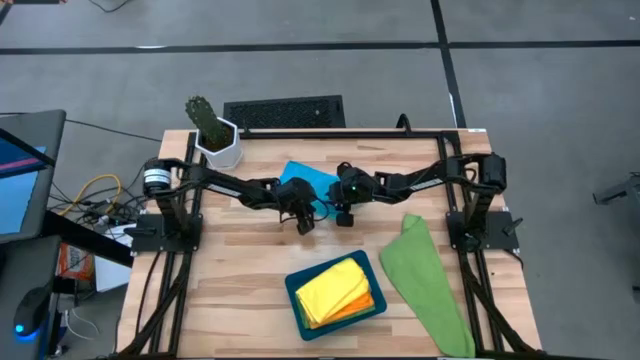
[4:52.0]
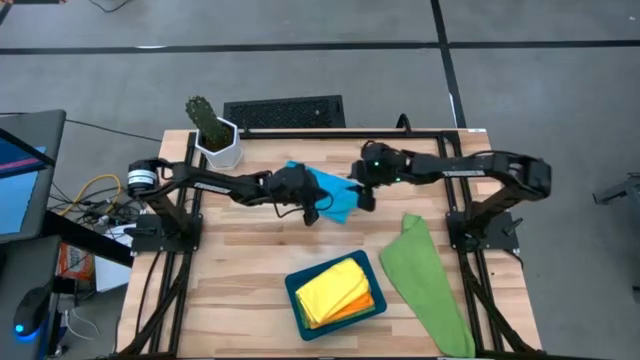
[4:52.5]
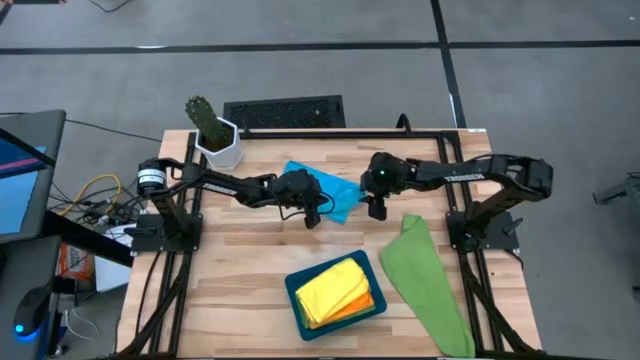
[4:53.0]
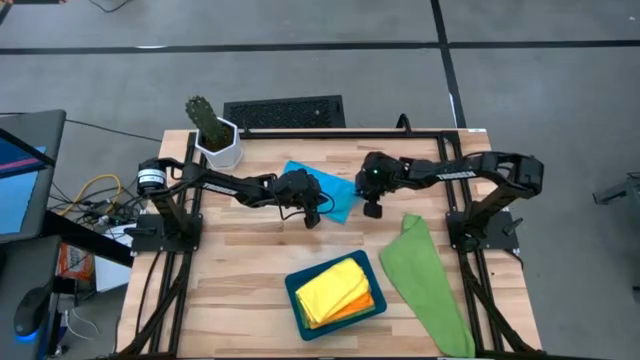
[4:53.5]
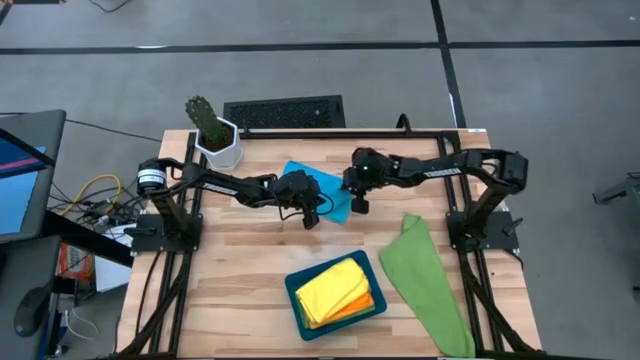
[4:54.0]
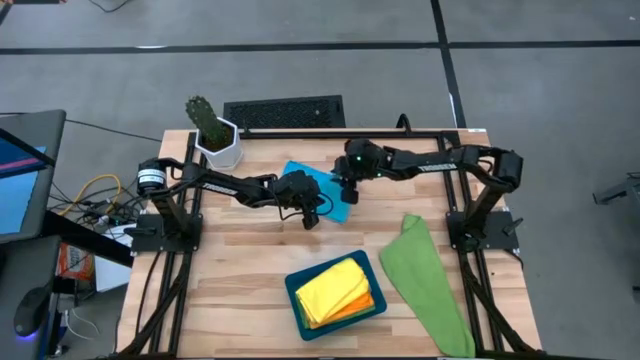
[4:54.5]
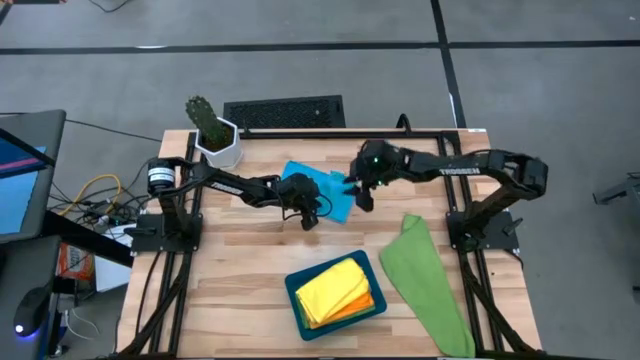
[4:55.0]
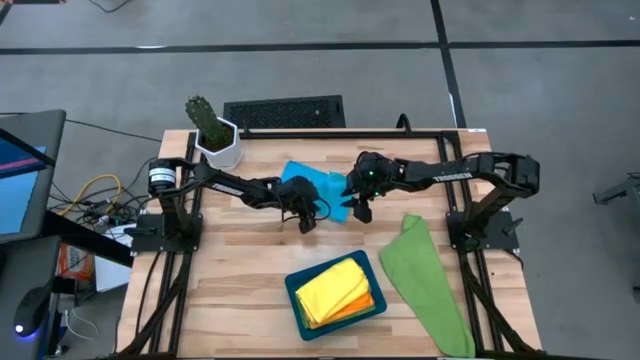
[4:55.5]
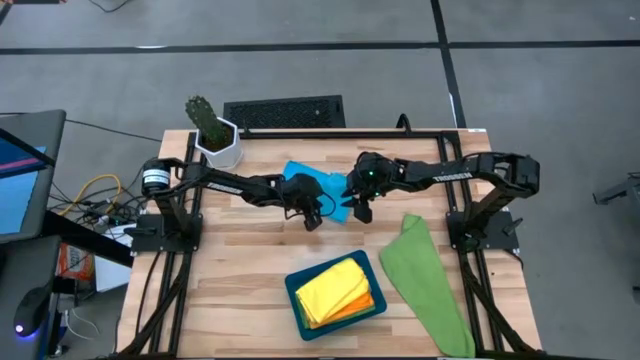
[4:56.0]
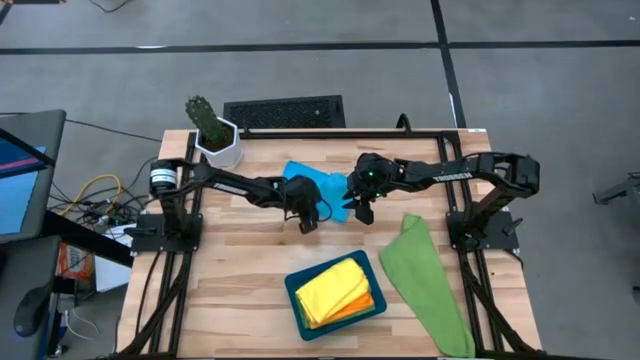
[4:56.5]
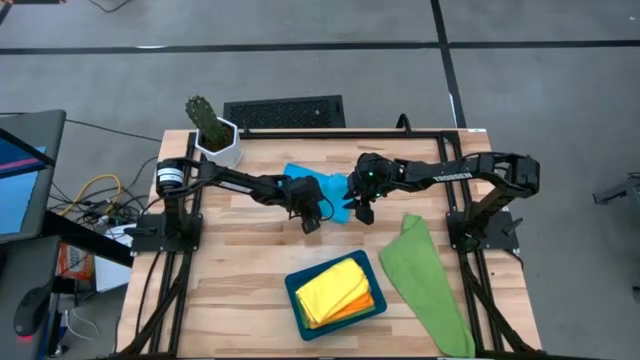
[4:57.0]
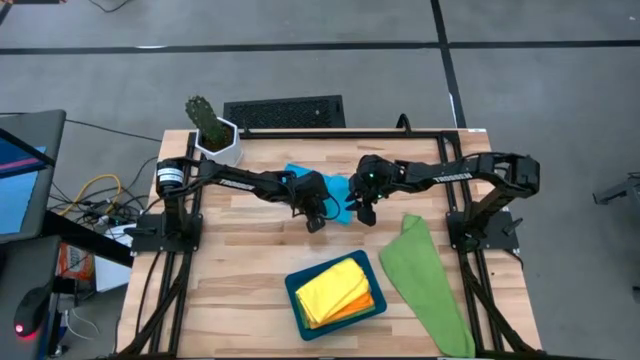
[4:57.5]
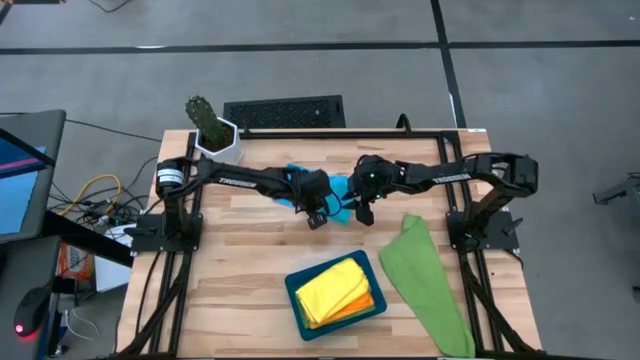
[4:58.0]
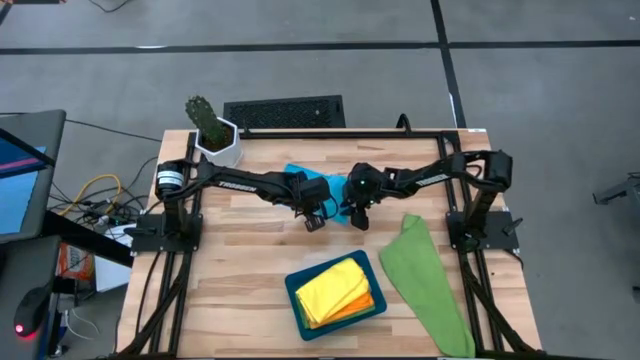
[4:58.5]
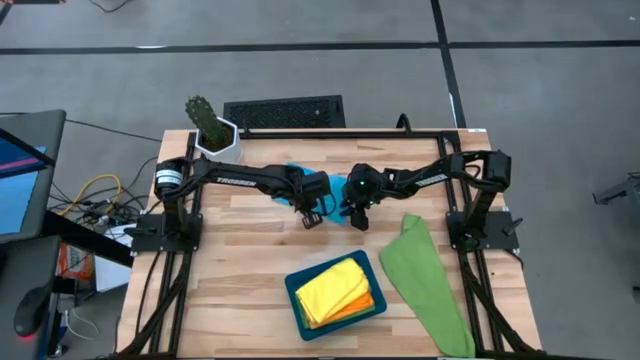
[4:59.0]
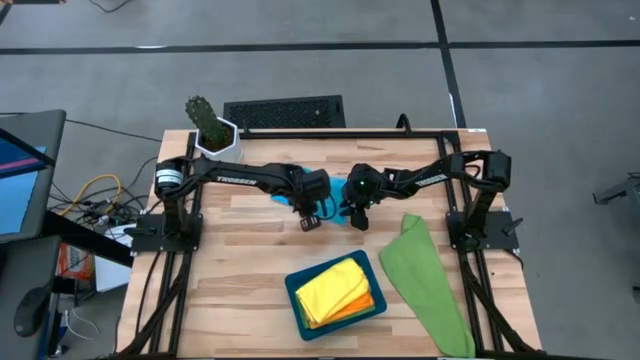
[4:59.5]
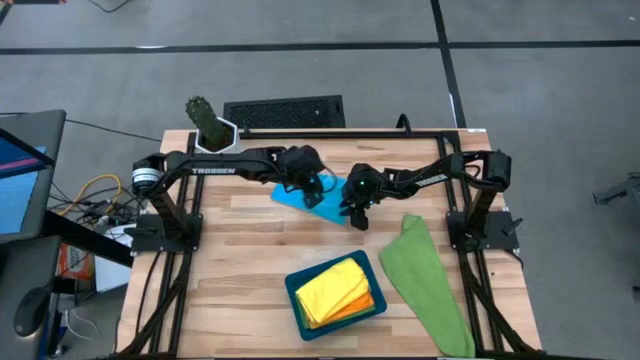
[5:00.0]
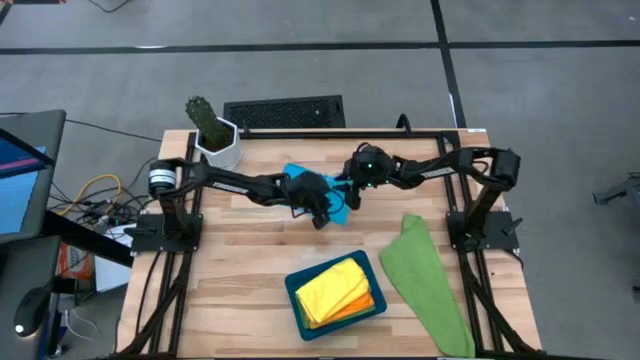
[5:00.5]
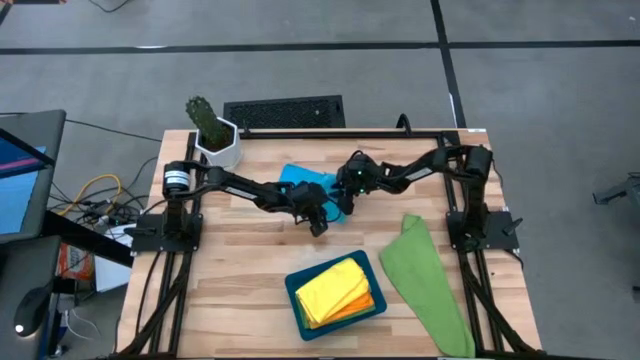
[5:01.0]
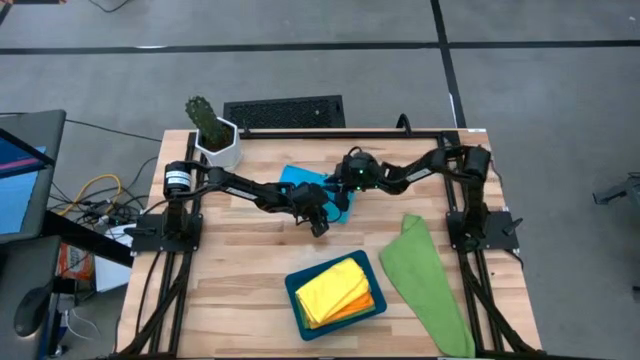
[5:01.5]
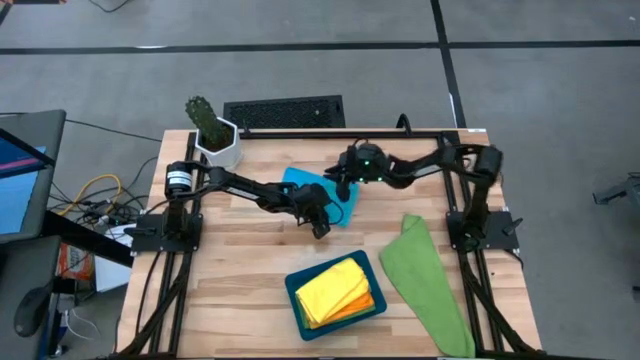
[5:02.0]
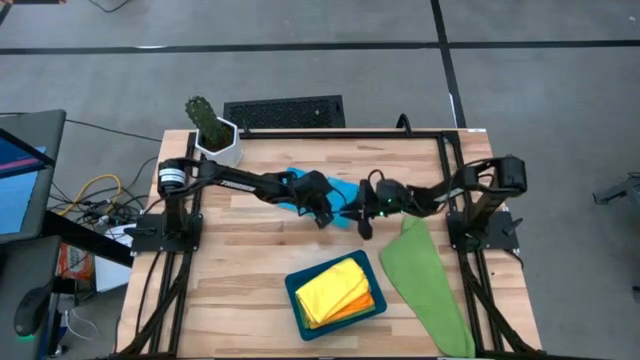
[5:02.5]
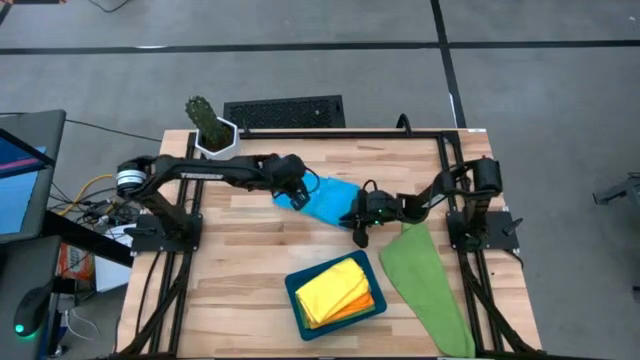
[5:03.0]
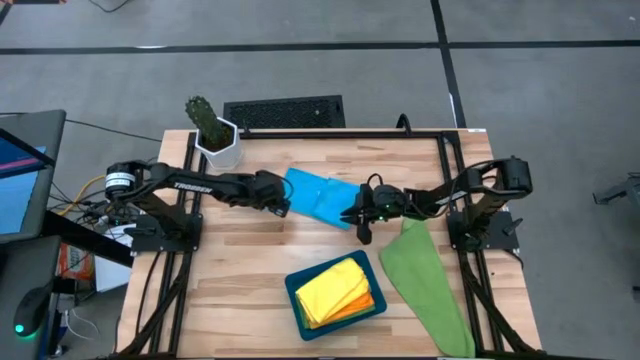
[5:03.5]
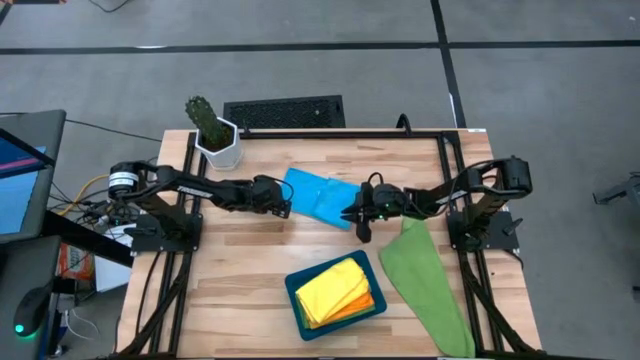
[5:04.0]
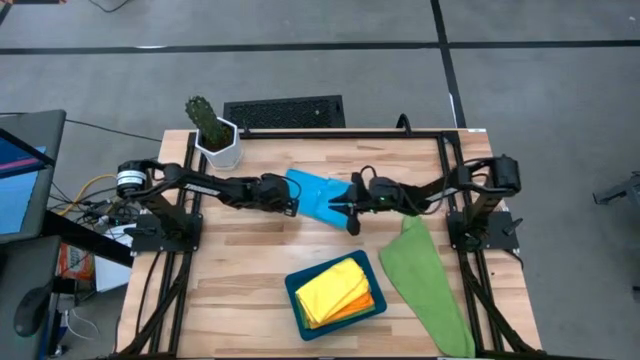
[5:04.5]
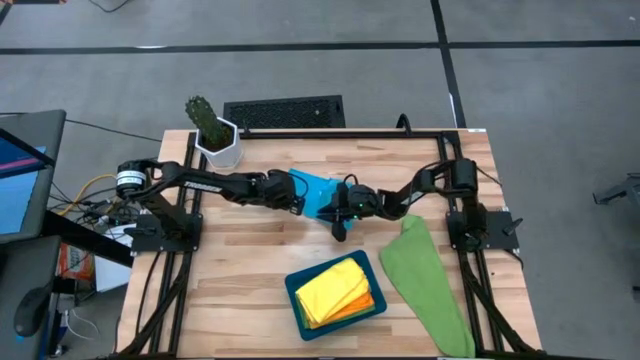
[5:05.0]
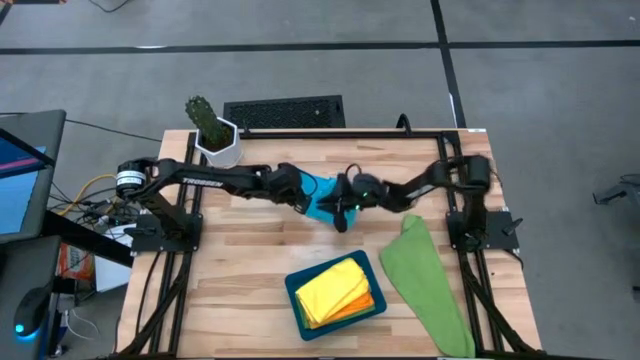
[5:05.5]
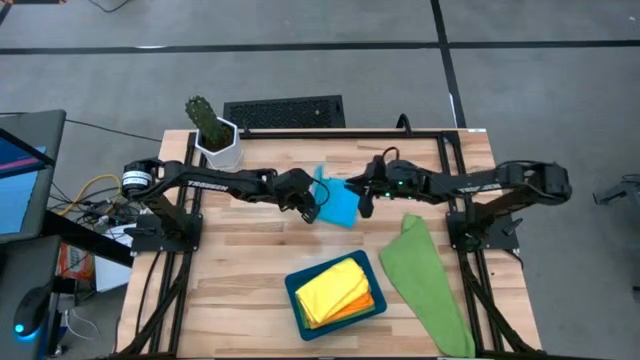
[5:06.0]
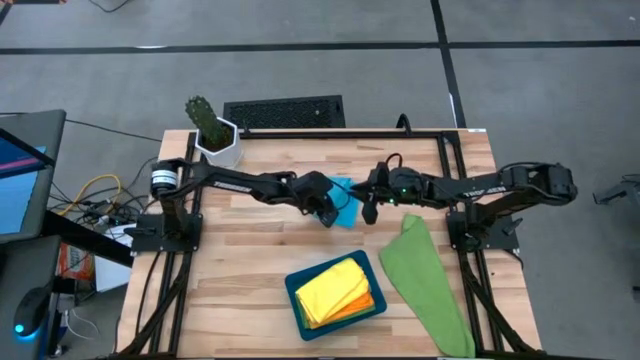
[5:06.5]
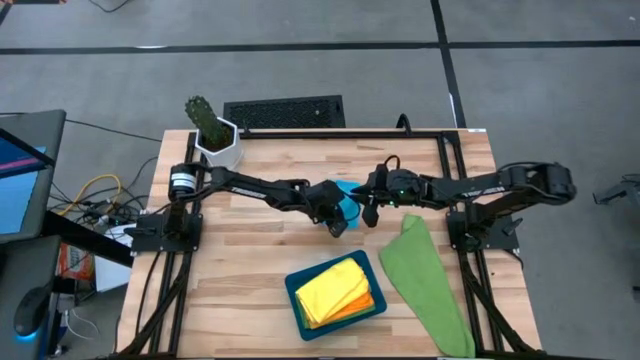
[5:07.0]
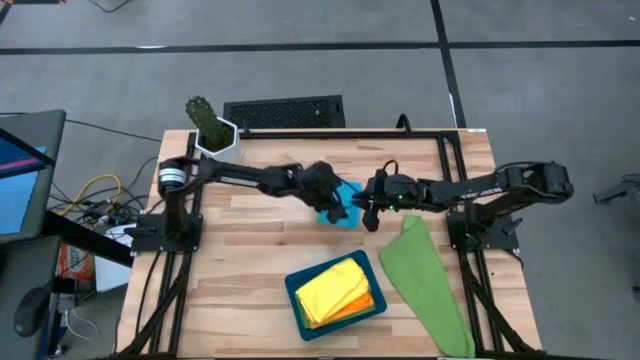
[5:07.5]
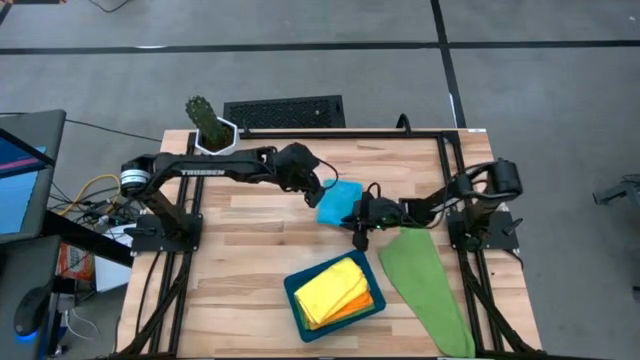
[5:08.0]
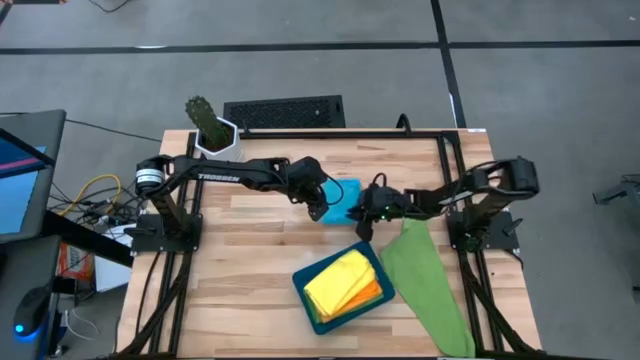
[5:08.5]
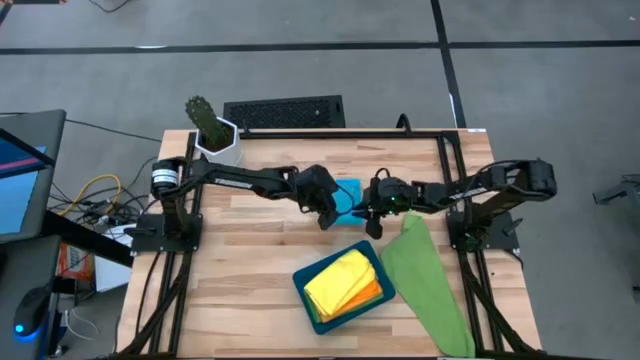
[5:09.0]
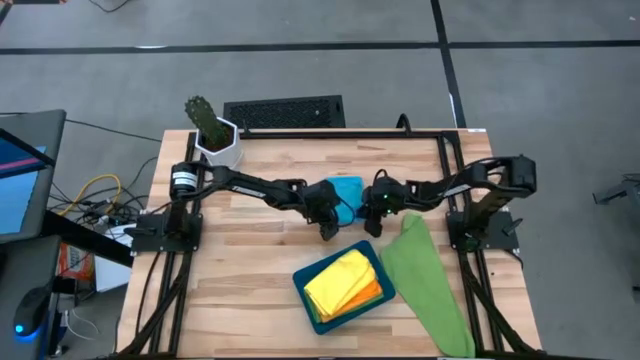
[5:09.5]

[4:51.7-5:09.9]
Task: Fold microfiber towels
Fold the blue microfiber towel

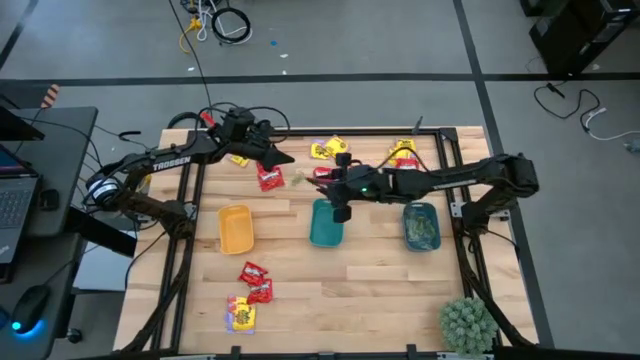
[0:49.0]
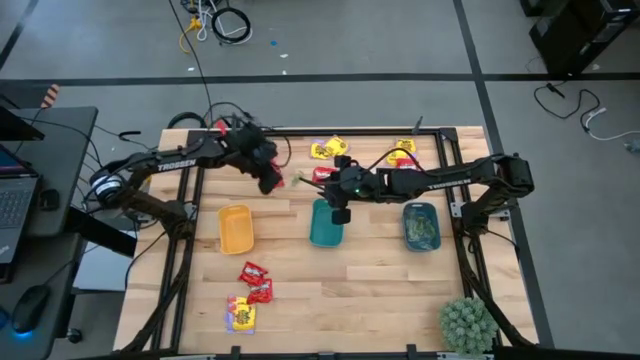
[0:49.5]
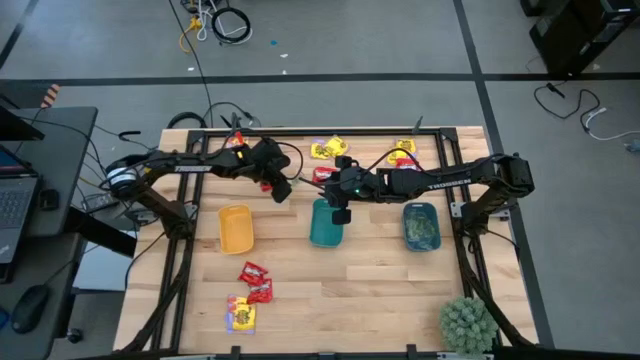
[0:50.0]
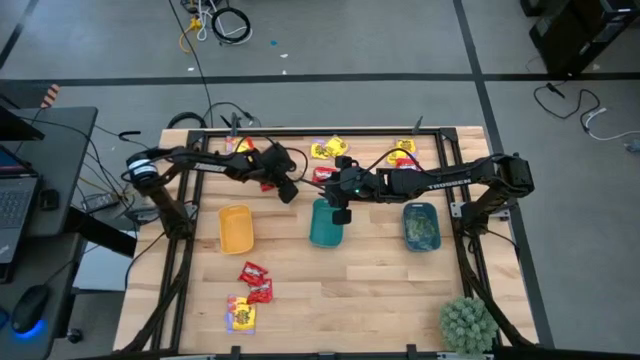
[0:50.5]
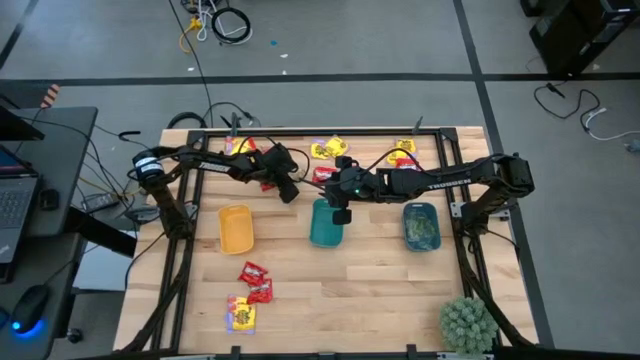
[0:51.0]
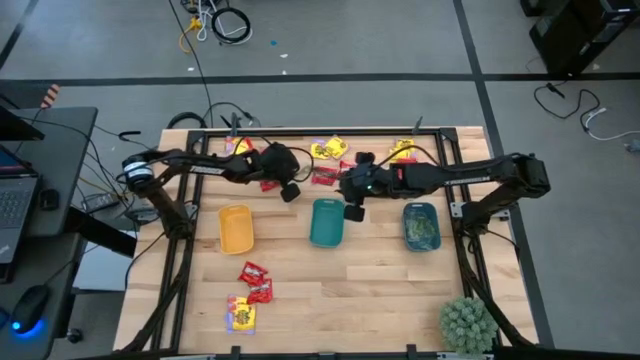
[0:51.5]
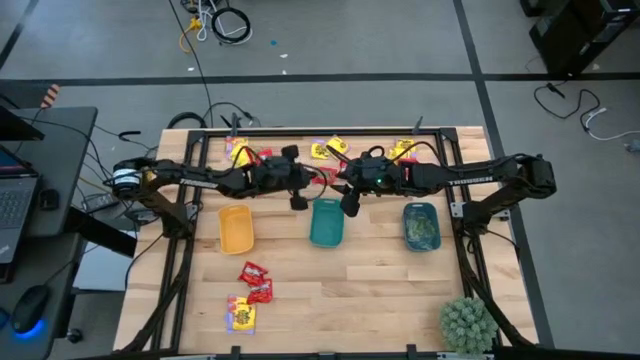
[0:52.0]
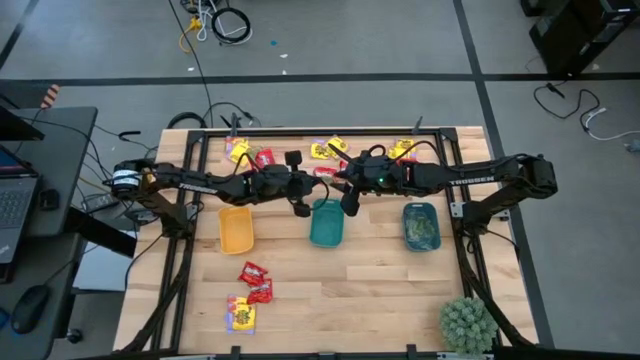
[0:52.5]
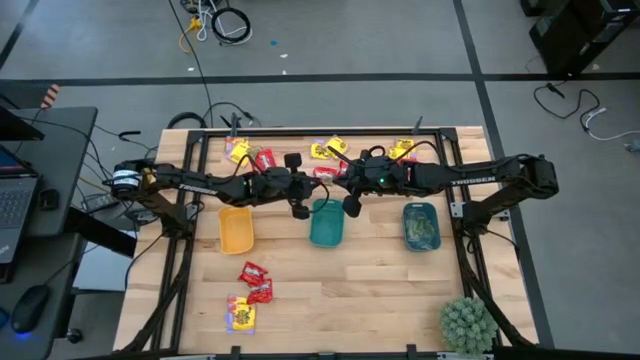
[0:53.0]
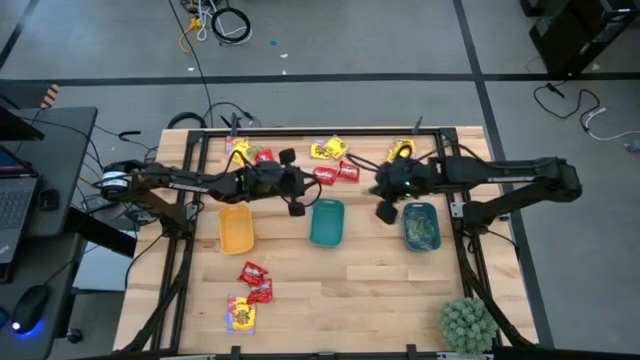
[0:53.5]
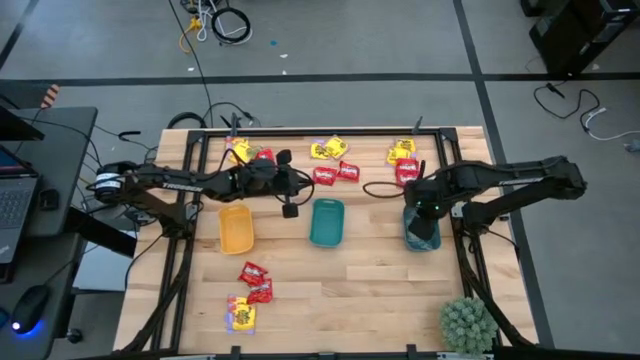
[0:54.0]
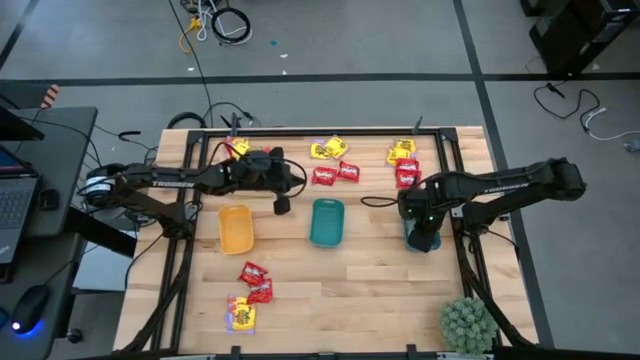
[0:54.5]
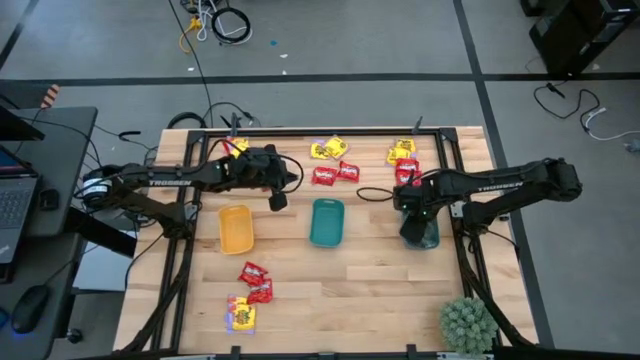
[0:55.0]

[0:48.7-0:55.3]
Task: Sort candy
Put the green transparent candy into the blue bin
